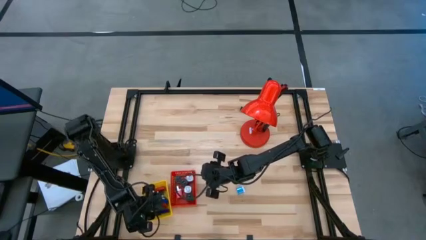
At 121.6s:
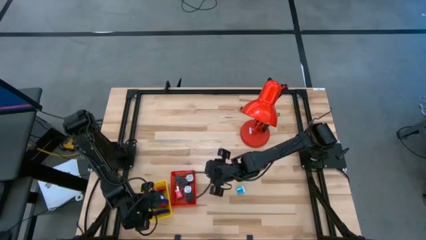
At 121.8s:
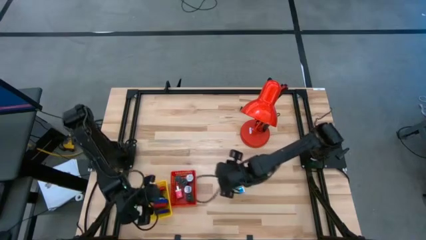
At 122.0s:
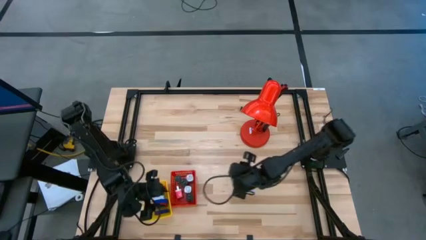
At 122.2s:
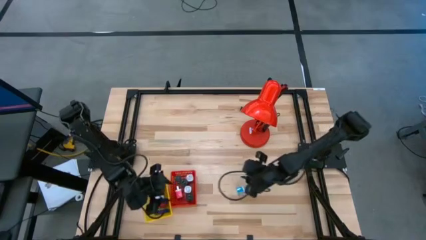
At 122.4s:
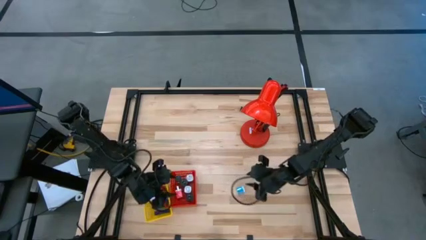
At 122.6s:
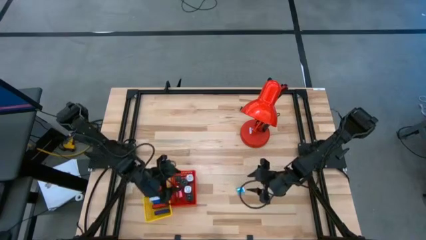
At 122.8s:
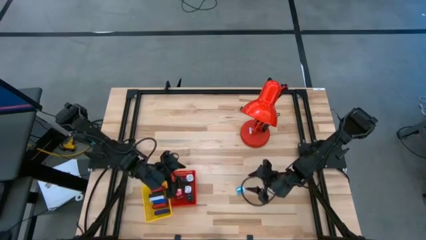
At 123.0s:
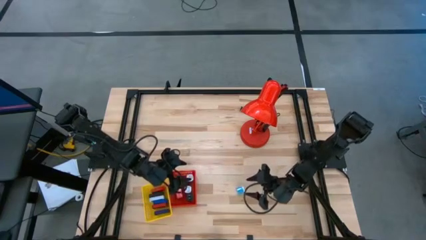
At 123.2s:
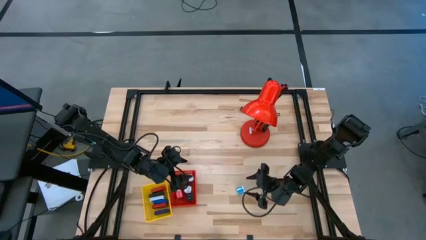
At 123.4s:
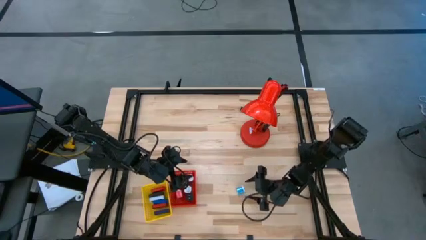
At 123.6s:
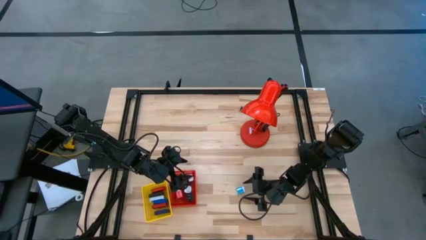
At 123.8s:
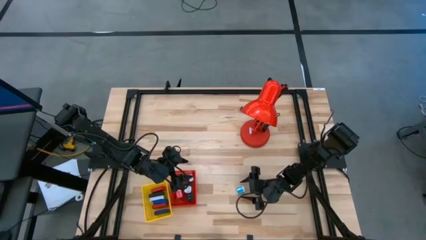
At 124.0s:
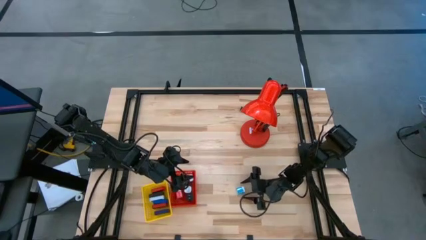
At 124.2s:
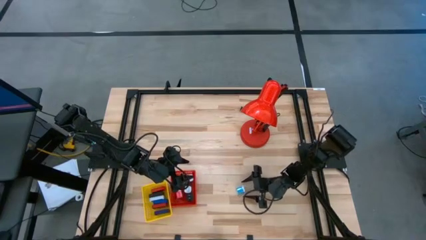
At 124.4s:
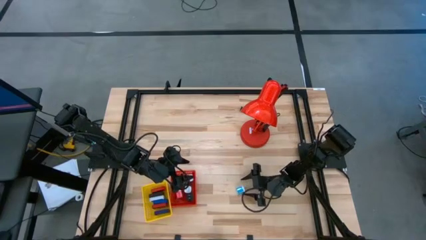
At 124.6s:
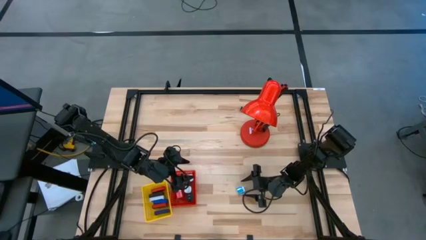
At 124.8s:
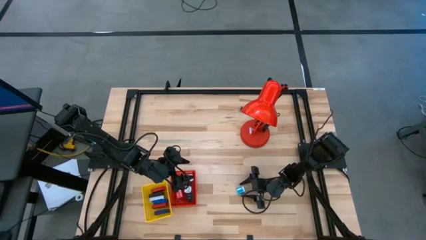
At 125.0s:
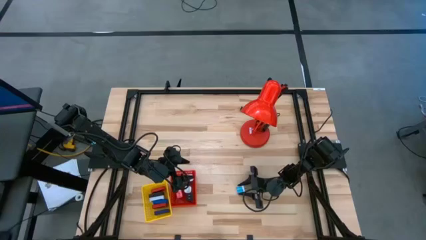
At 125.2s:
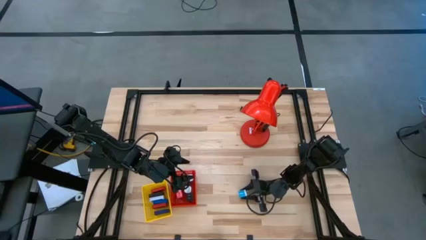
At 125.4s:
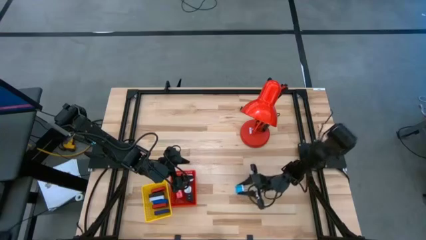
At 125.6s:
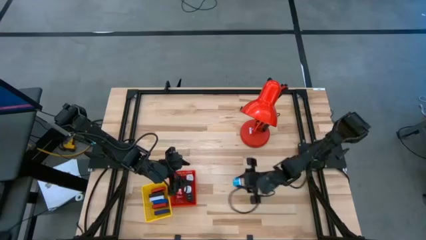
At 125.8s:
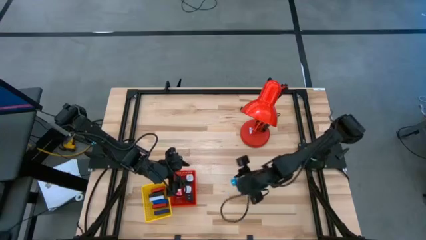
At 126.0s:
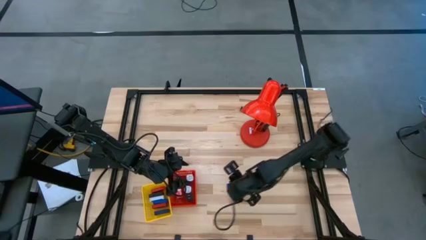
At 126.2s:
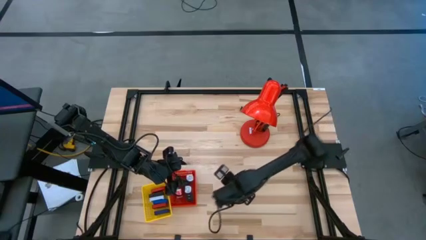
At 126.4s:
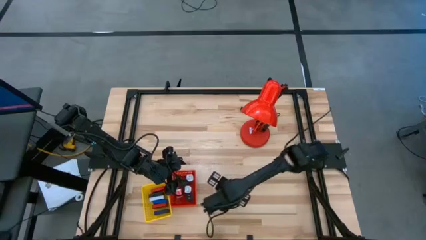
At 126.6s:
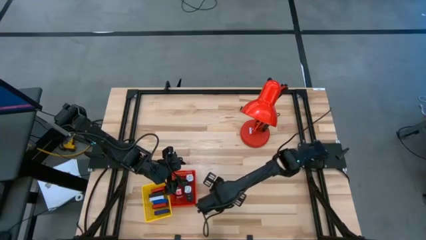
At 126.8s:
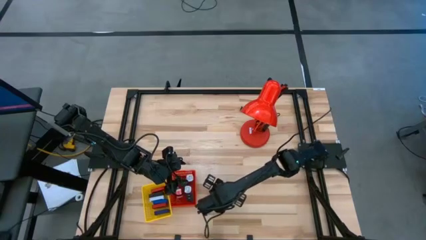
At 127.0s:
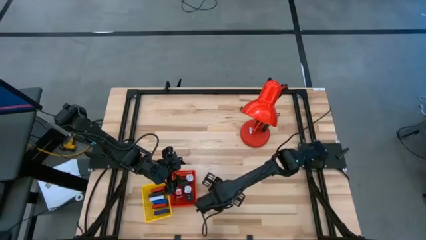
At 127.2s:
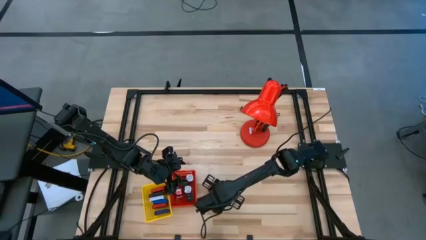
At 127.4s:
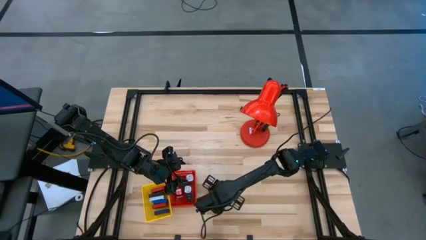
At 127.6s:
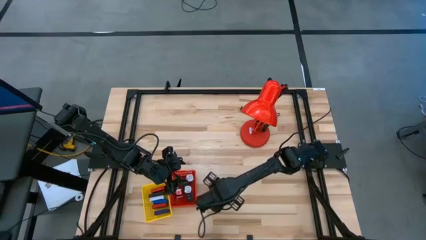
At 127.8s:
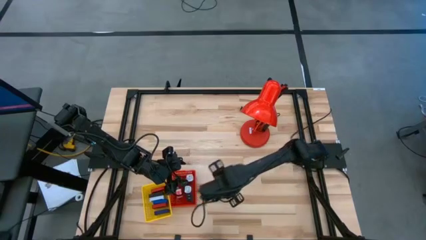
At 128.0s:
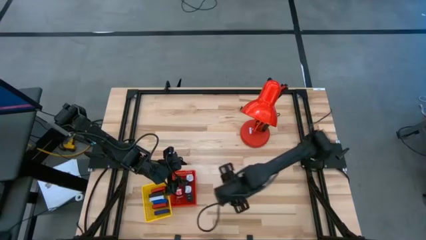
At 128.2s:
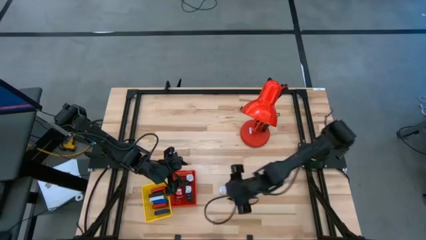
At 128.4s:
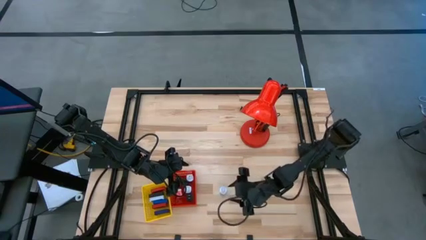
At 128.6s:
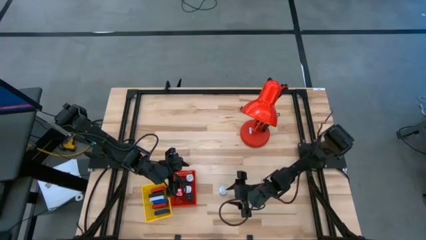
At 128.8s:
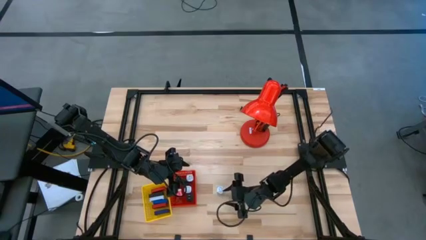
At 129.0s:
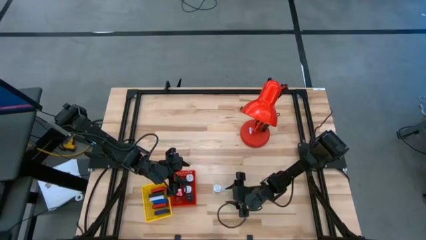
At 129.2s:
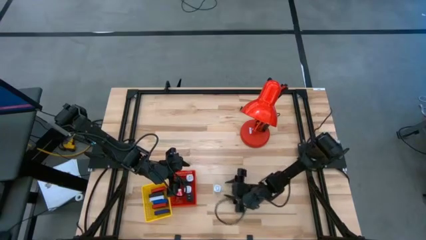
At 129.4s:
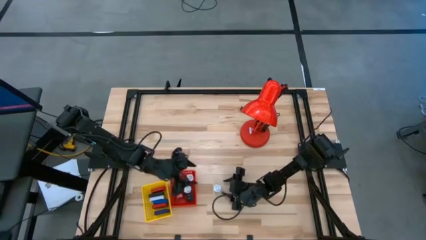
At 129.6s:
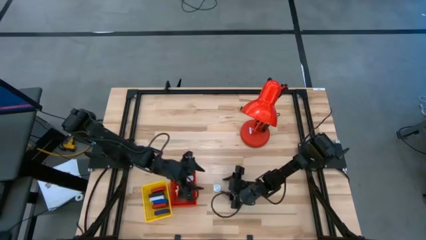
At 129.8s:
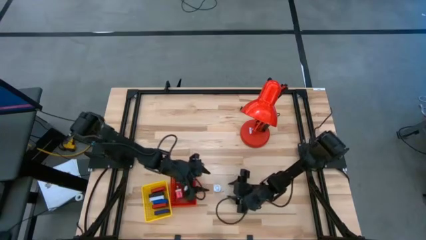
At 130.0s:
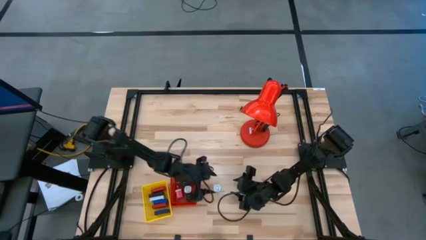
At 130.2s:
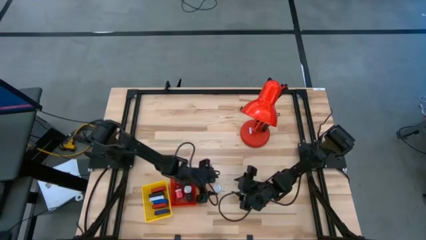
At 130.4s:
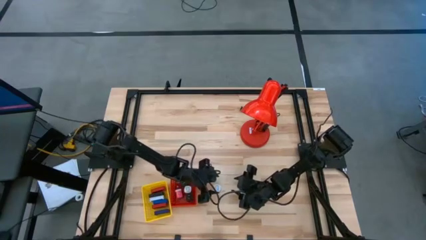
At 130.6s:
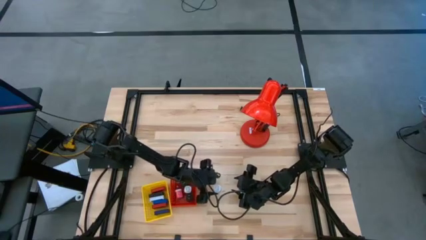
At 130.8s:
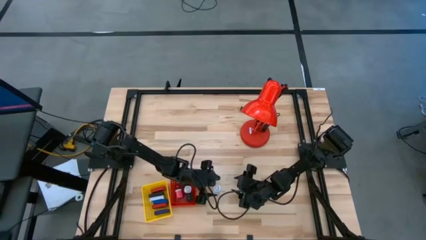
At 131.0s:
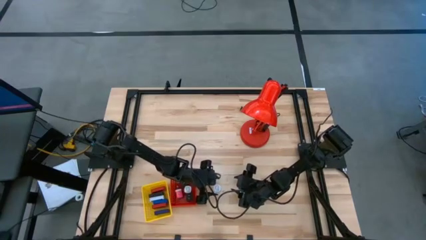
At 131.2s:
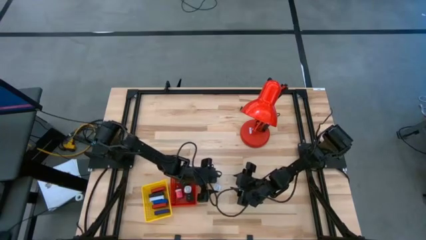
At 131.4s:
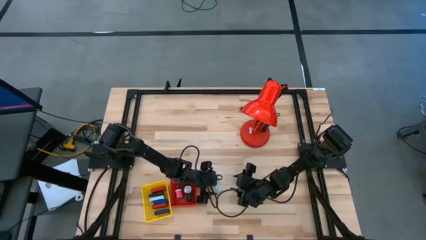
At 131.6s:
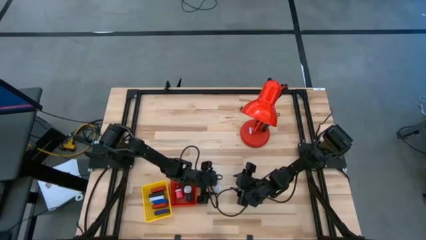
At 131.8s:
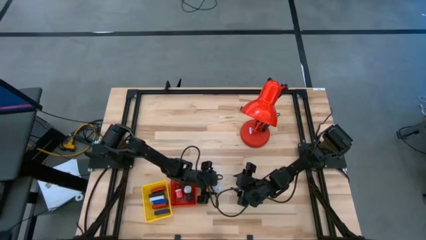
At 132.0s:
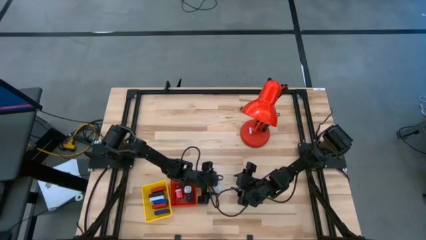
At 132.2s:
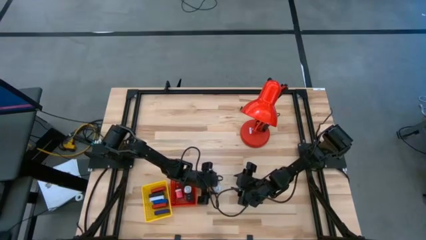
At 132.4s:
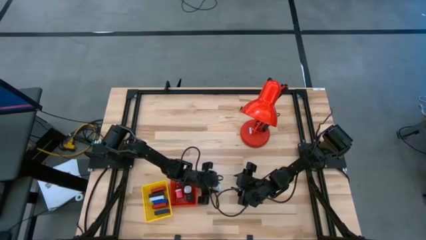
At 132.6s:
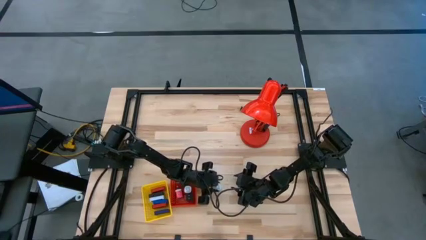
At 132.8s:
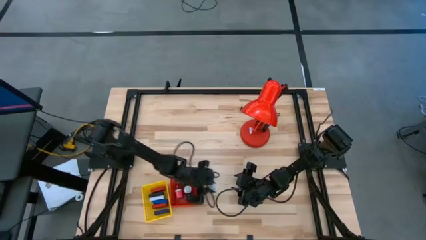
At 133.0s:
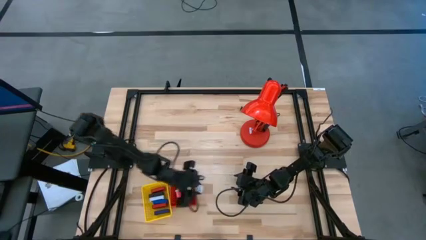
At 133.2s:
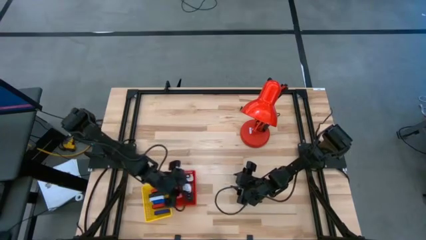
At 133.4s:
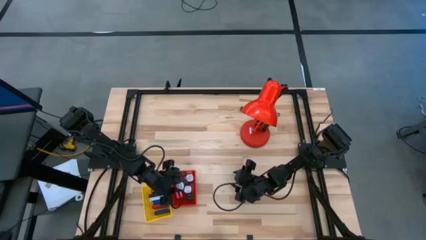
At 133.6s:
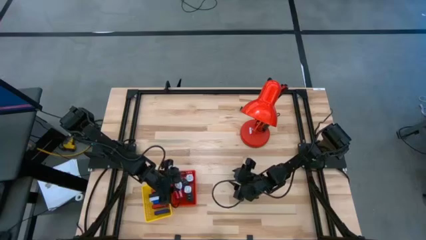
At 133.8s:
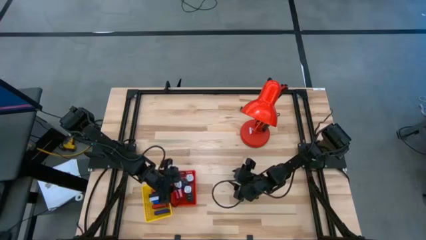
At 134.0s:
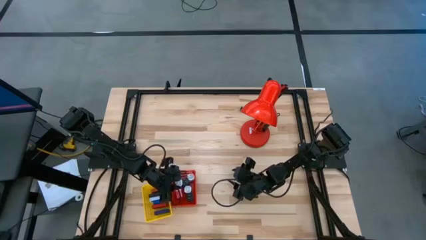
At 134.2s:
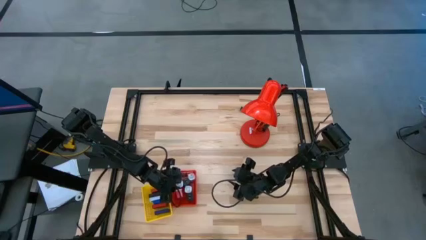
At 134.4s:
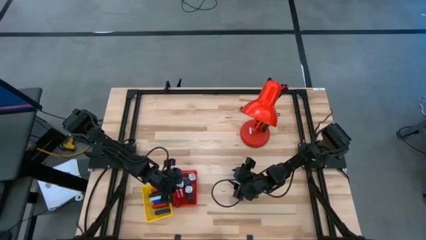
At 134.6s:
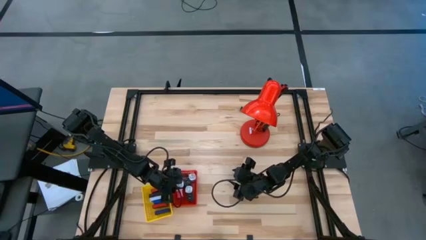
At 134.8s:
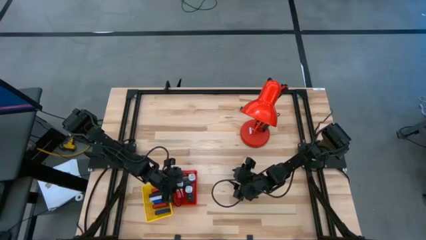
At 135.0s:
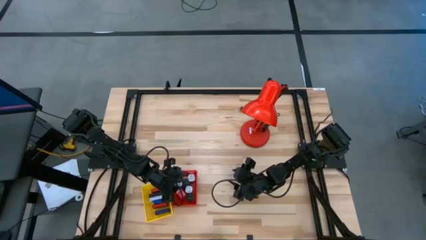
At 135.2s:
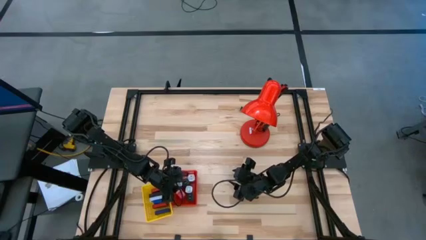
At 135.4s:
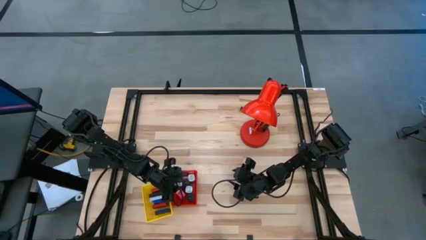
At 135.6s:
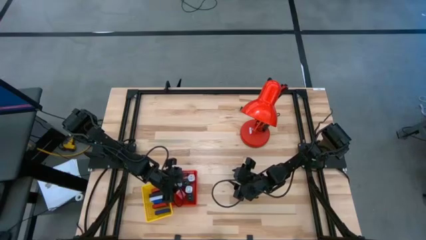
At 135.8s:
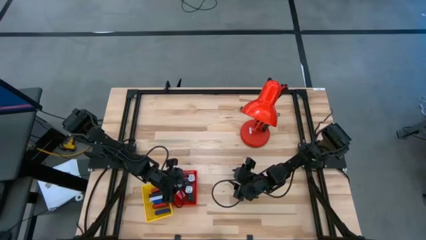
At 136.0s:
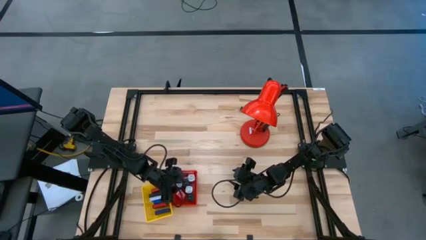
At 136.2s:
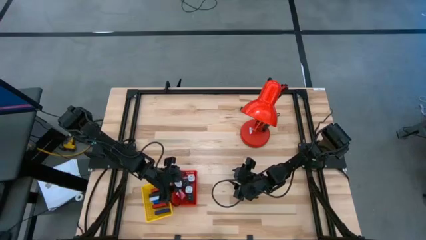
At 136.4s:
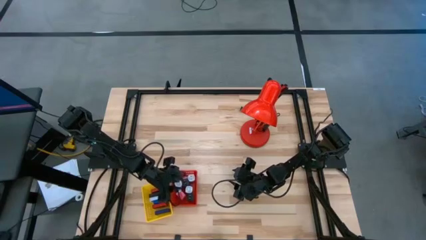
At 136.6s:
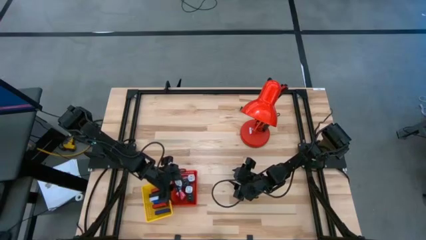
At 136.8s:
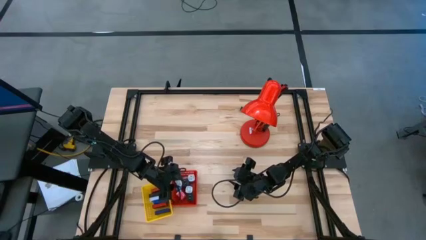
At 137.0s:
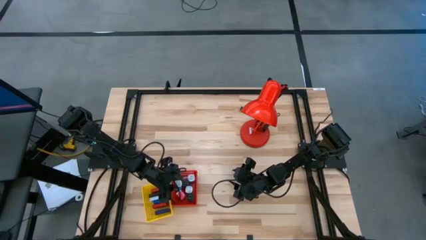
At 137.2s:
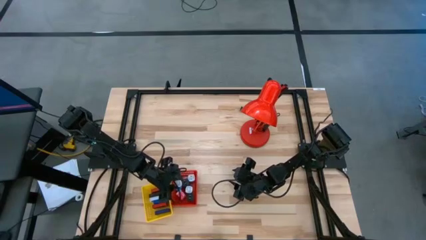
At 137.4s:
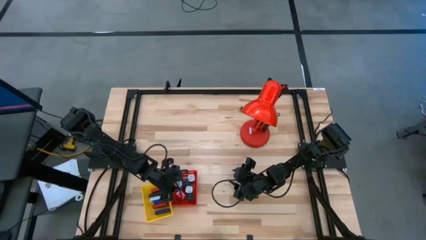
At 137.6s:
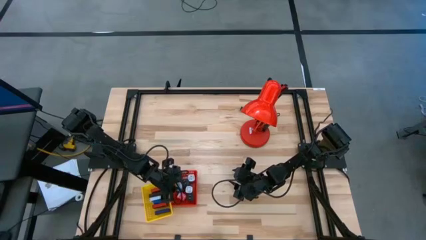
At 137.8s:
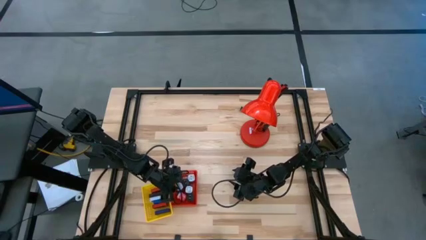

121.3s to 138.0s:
Task: Pick & Place Office items
Put the light blue charger adapter into the red bin
